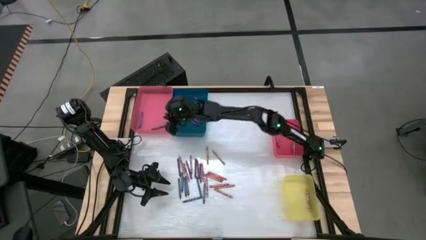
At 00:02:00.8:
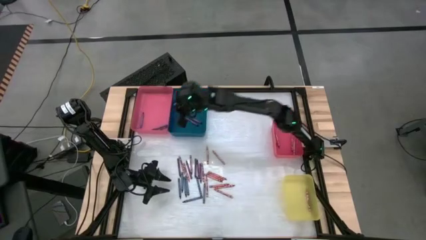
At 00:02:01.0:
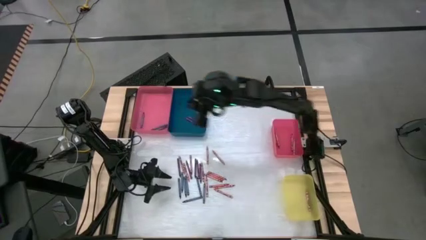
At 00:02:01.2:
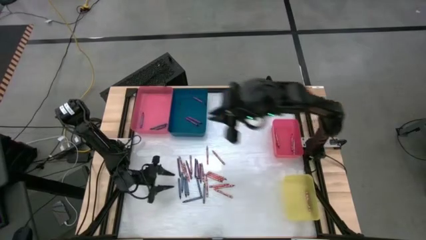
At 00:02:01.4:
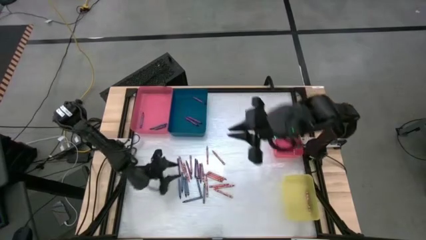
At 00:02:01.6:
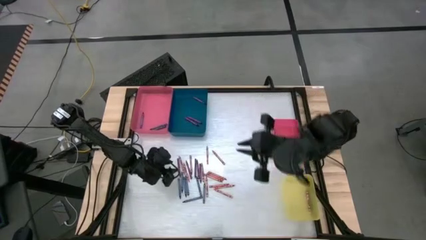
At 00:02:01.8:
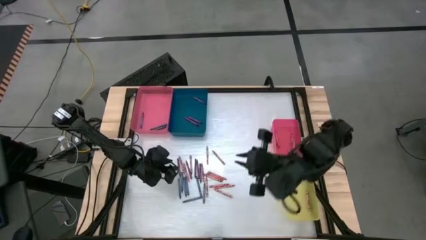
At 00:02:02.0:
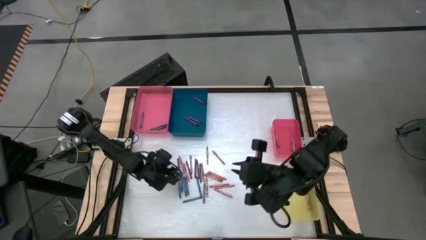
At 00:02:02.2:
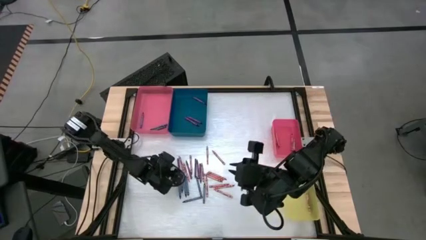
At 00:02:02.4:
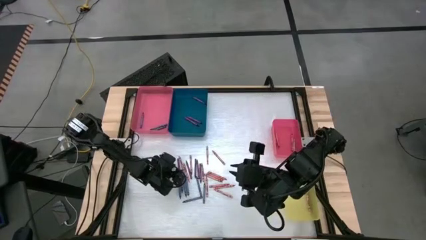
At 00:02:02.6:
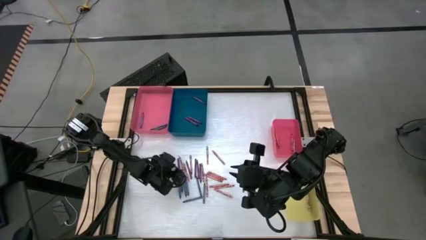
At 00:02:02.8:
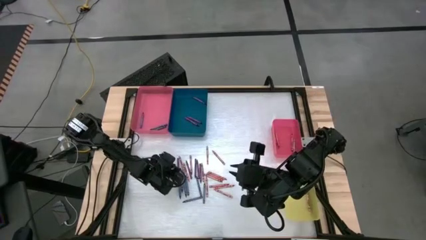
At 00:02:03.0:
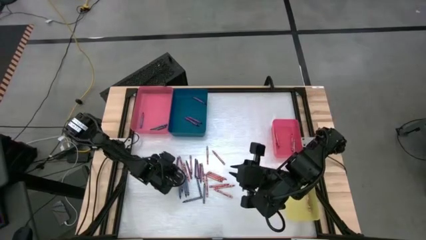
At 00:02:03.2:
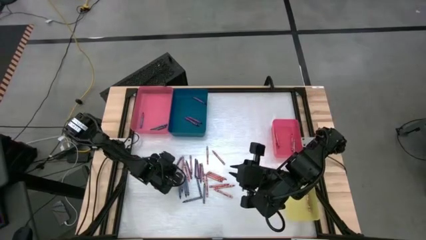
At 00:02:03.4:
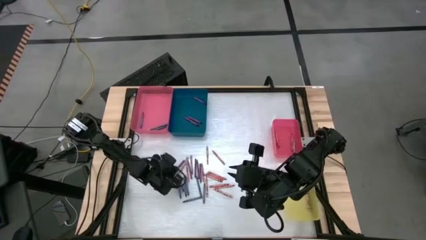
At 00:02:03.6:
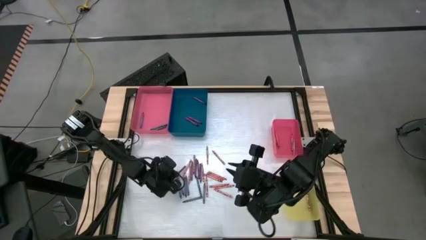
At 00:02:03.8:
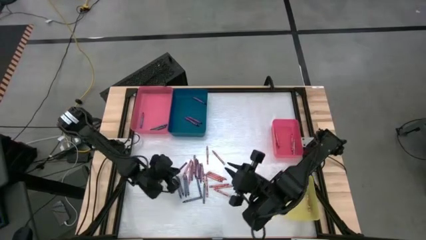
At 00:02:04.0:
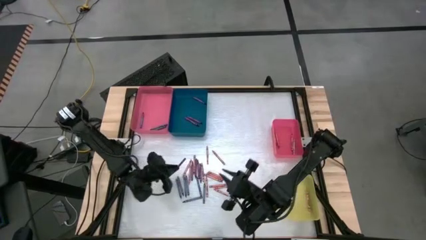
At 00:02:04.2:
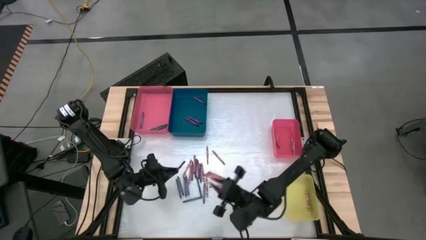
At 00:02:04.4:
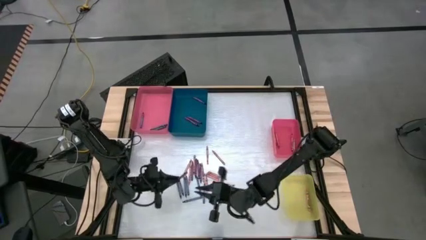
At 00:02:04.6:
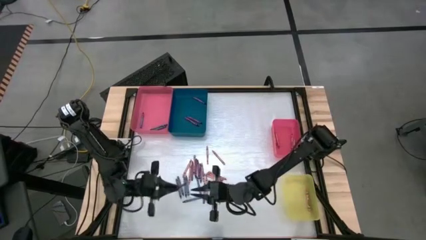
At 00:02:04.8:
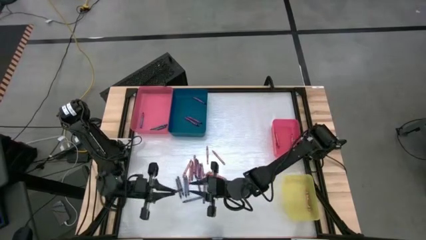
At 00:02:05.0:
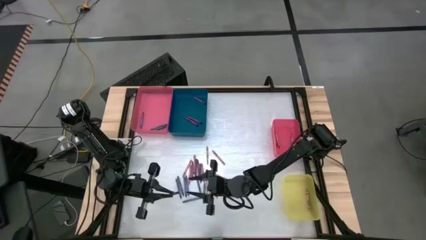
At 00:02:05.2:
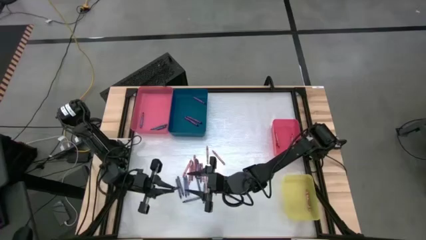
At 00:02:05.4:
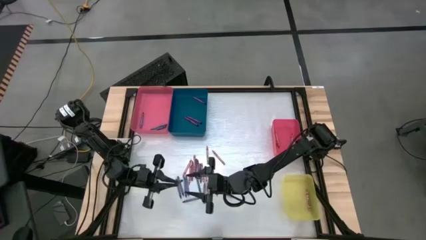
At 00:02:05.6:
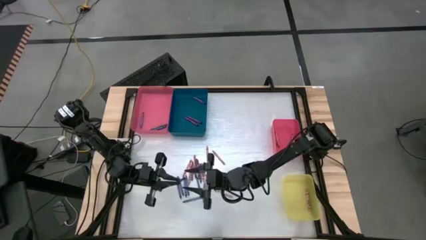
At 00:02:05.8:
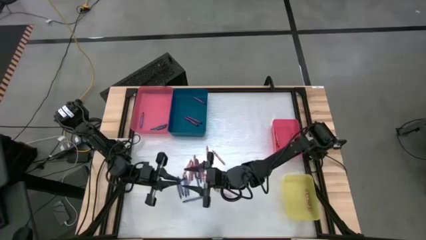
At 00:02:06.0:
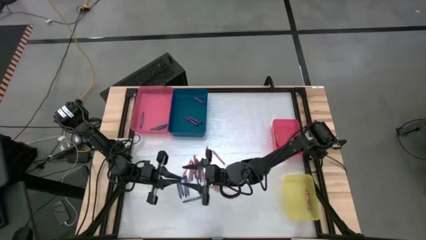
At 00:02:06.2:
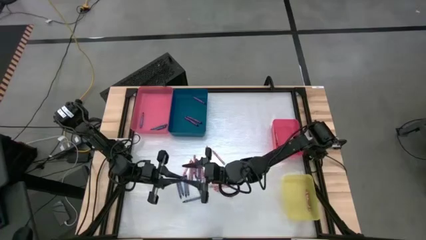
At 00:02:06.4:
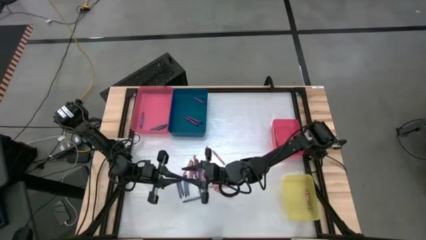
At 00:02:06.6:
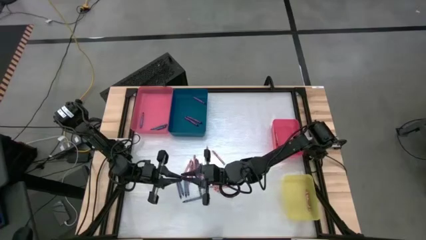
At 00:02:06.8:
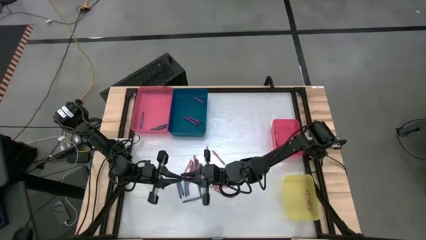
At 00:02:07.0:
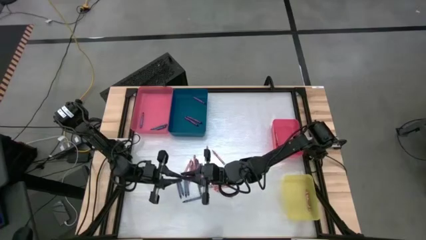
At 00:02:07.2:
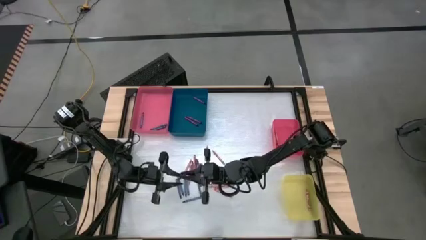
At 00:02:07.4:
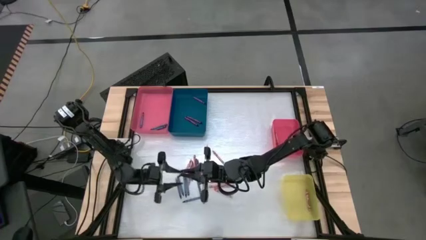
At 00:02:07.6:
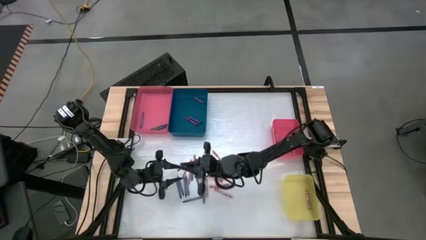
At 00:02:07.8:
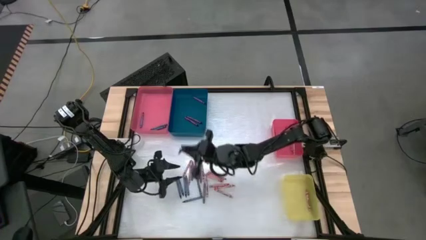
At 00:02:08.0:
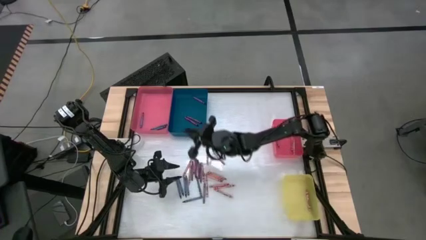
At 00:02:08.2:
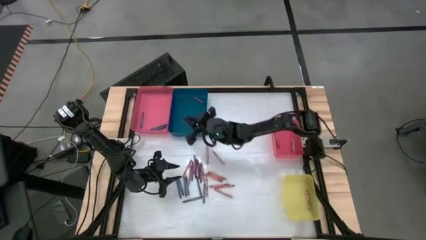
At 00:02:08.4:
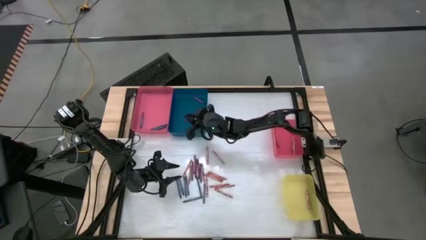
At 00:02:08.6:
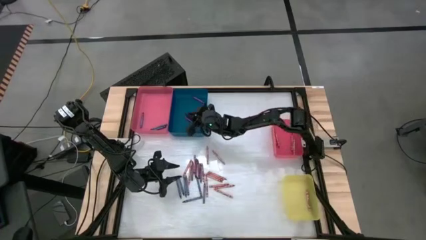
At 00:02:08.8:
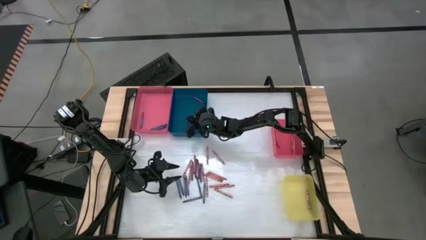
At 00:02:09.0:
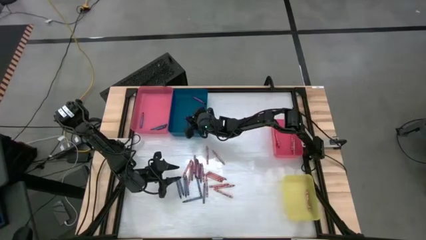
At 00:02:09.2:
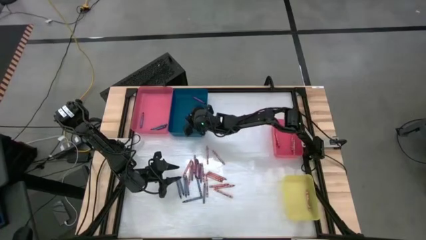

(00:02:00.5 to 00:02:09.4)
Task: Sort crayons
Put the purple crayon into the blue bin
